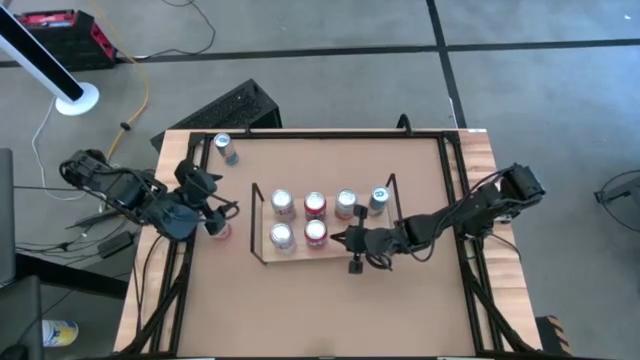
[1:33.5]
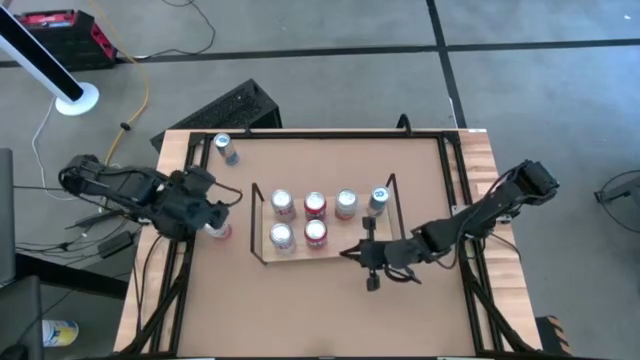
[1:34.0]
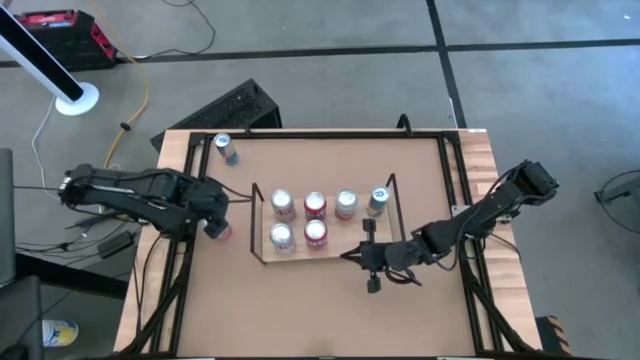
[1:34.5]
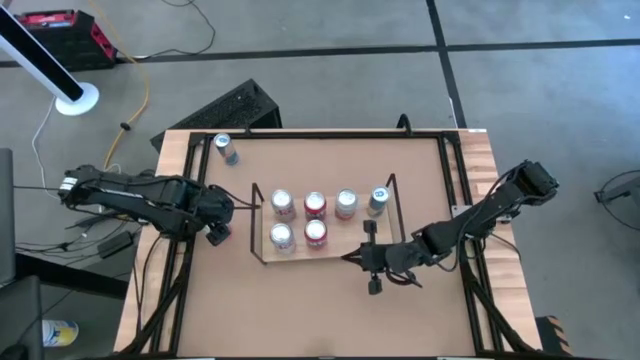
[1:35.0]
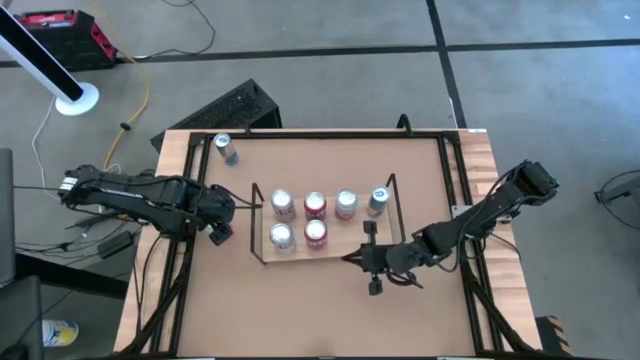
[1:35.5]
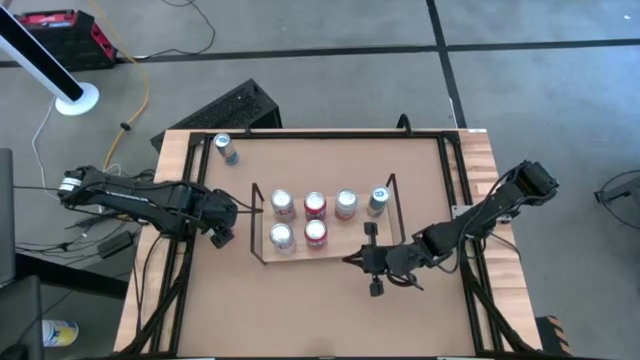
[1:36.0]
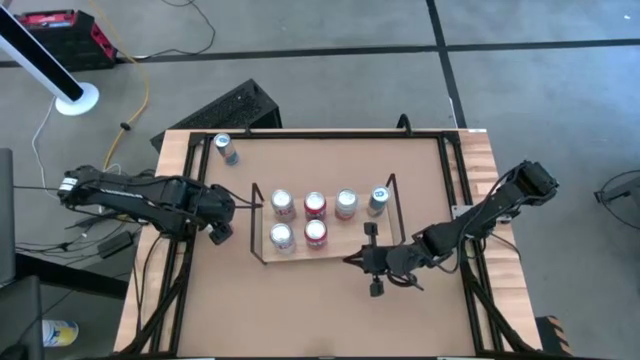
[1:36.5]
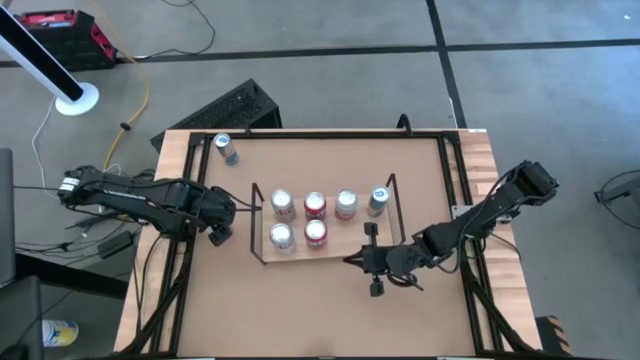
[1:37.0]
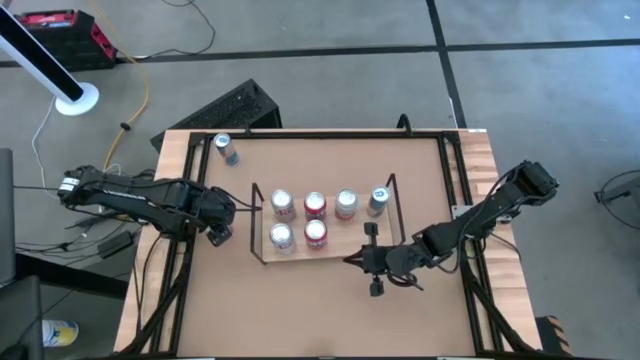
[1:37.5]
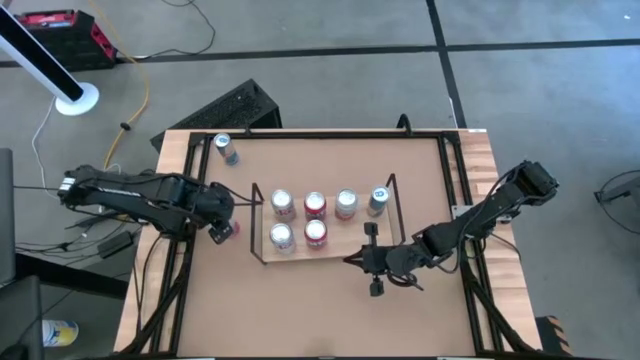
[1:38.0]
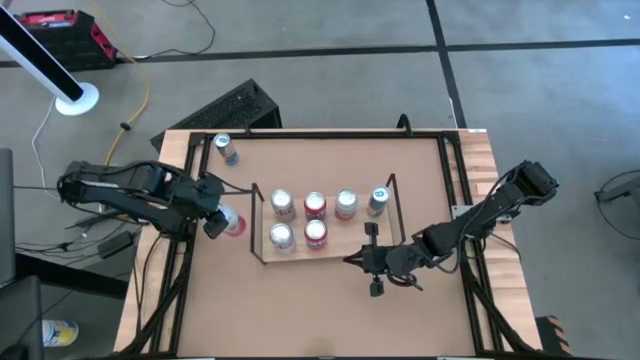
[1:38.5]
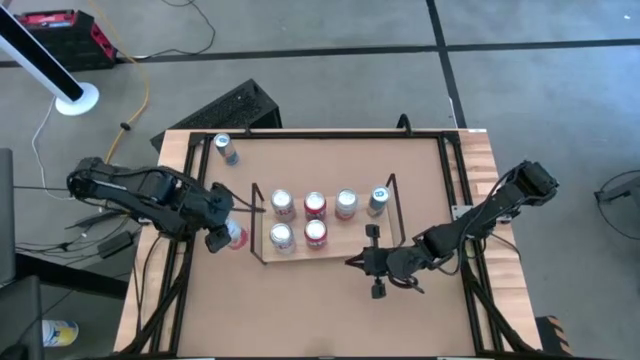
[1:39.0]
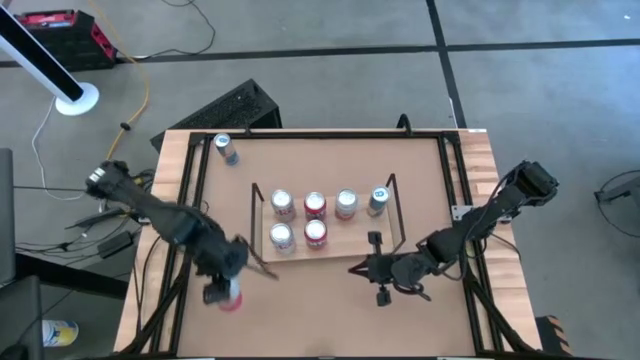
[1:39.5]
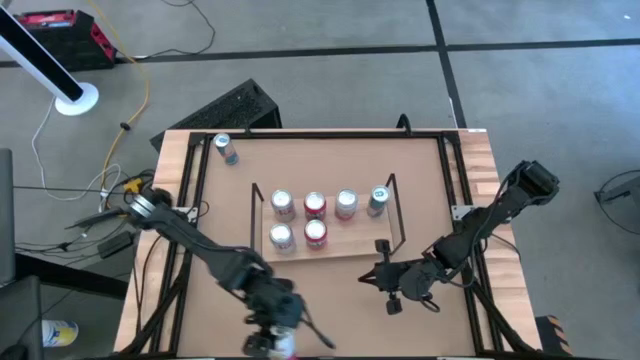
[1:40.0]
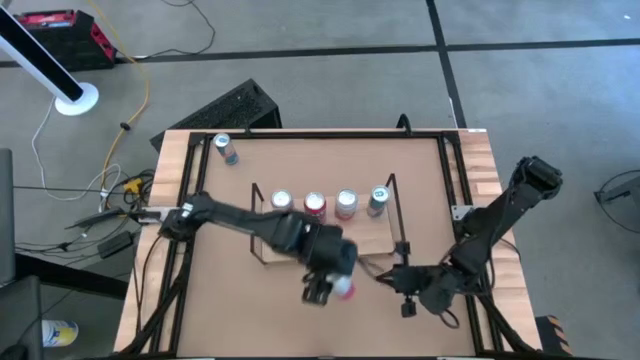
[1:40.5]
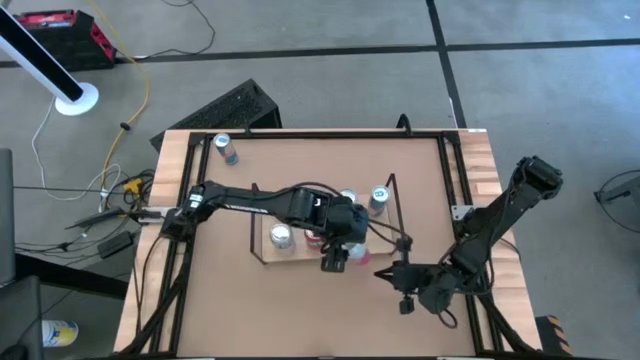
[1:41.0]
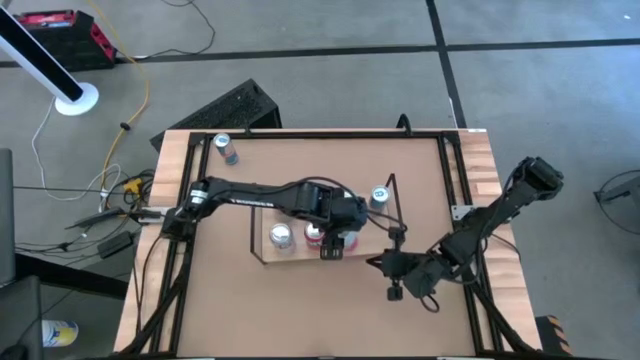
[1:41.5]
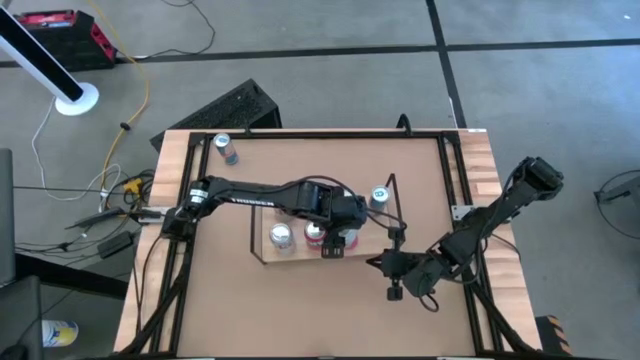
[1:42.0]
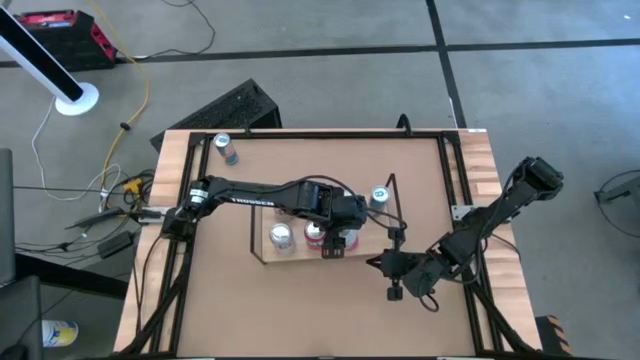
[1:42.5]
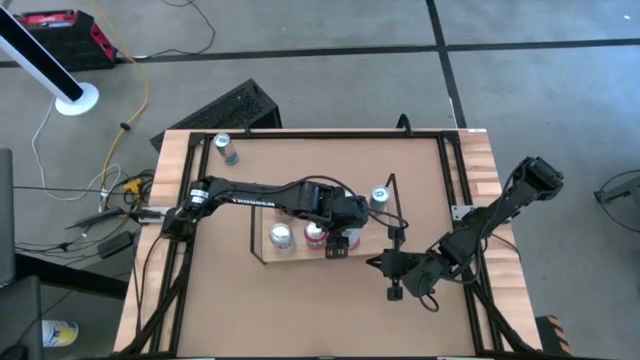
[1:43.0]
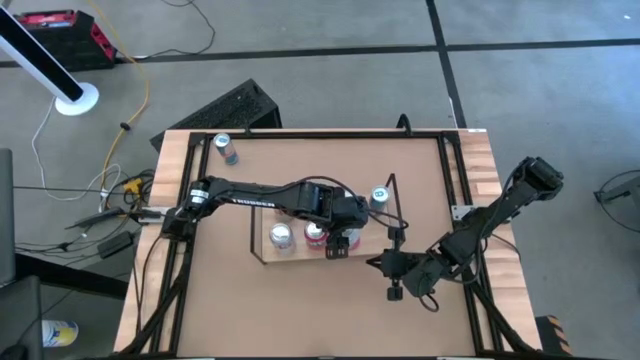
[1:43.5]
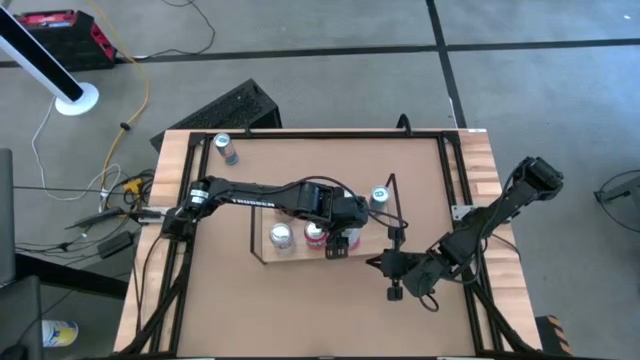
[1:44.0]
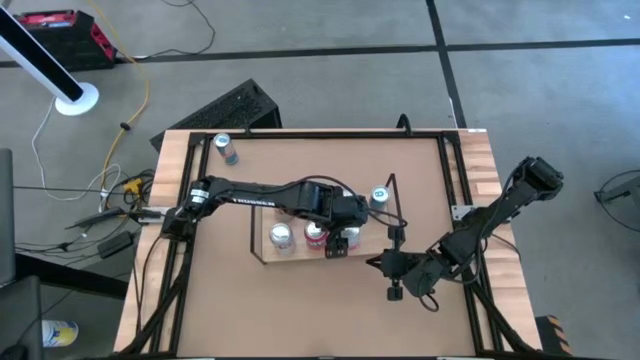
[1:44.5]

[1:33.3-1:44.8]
Task: Place canned beverage on shelf
Put the pink soda can on the shelf aligned with the other orange can

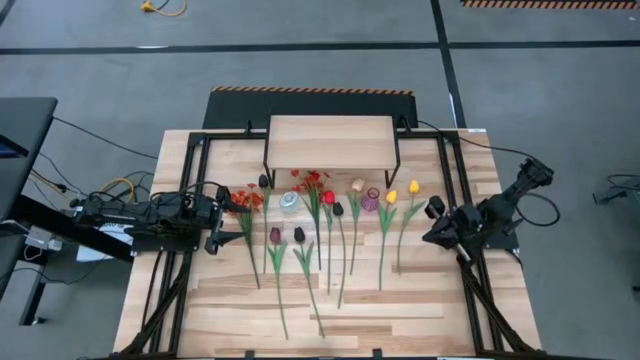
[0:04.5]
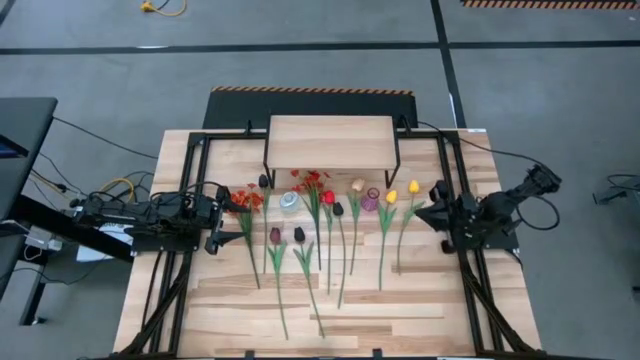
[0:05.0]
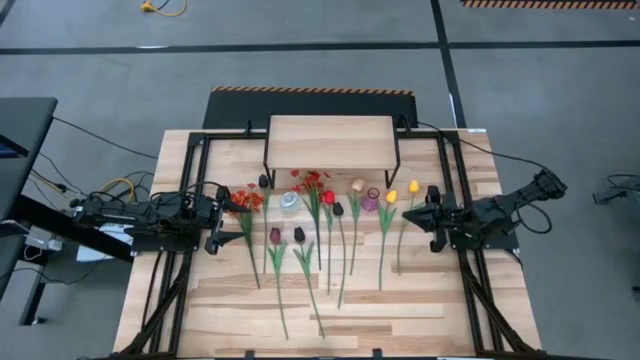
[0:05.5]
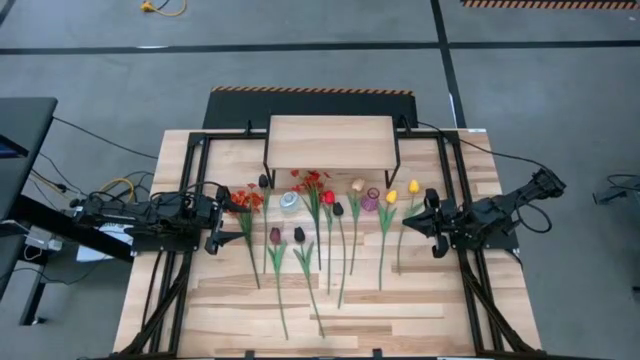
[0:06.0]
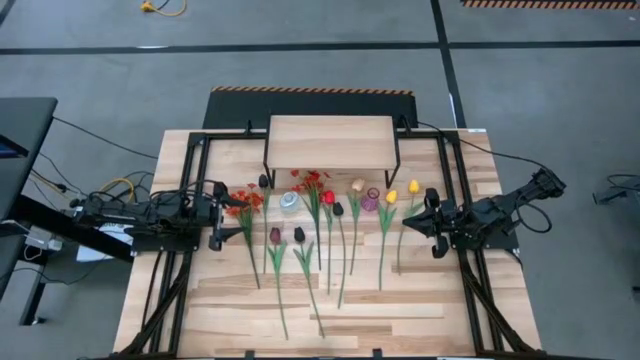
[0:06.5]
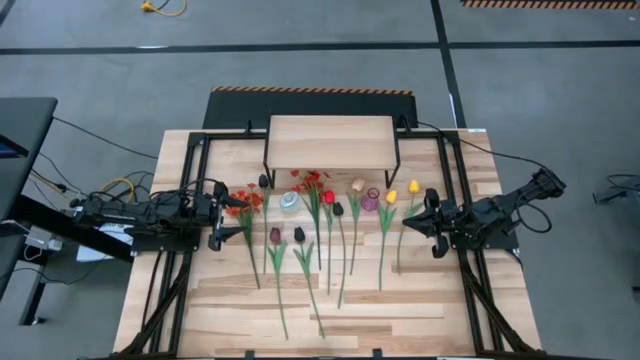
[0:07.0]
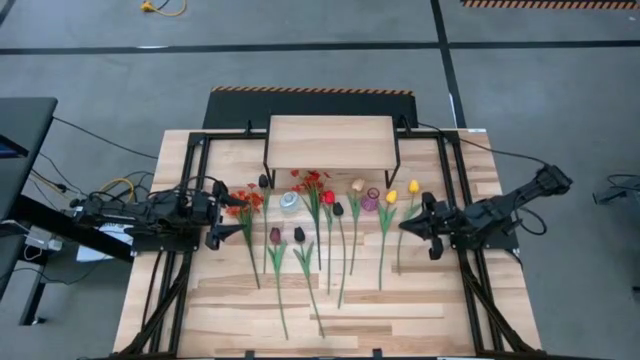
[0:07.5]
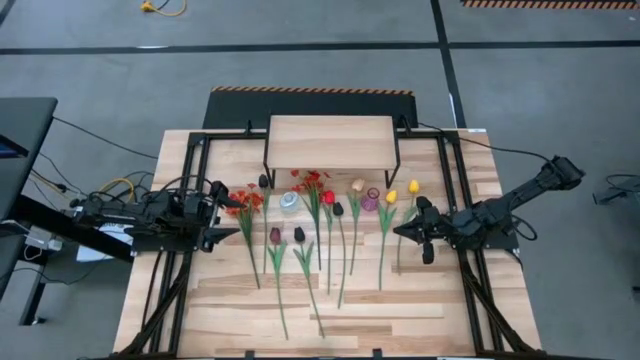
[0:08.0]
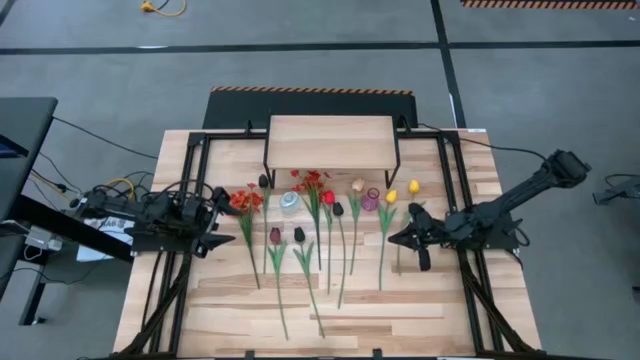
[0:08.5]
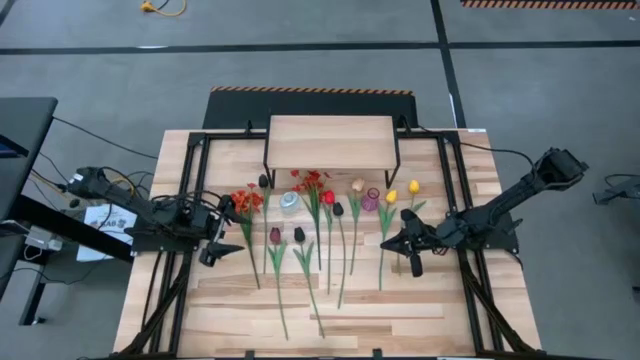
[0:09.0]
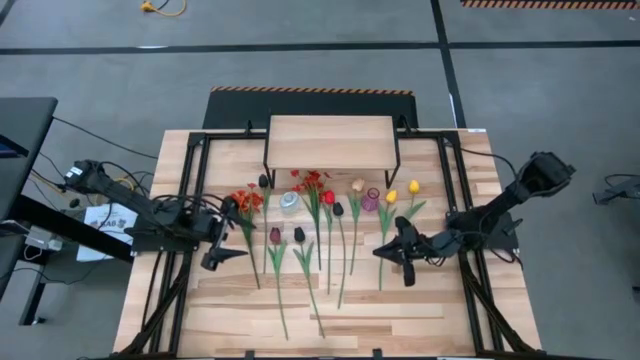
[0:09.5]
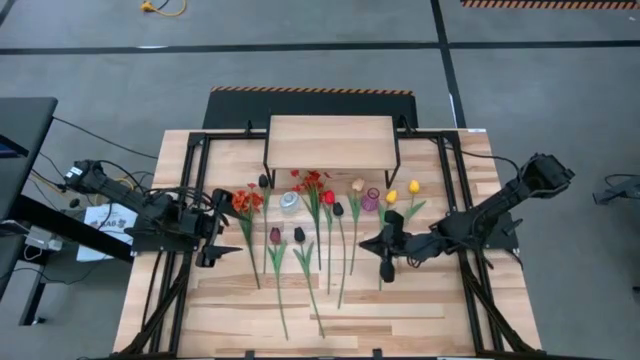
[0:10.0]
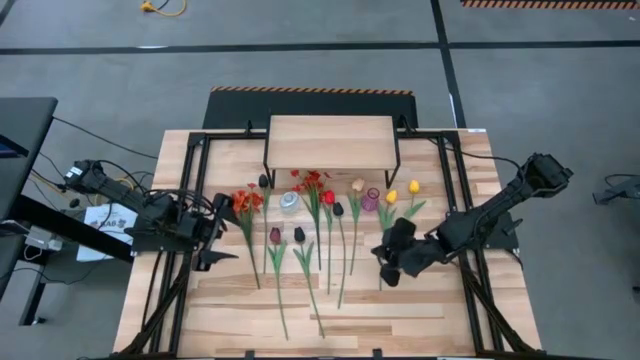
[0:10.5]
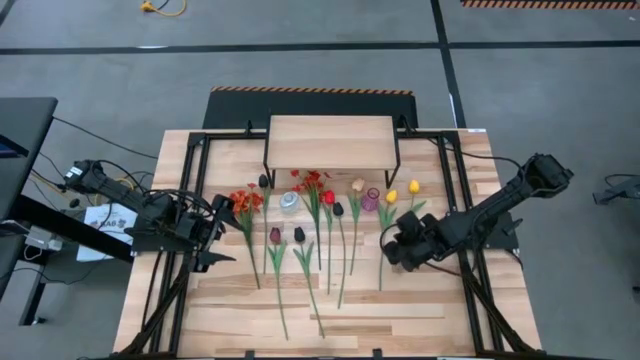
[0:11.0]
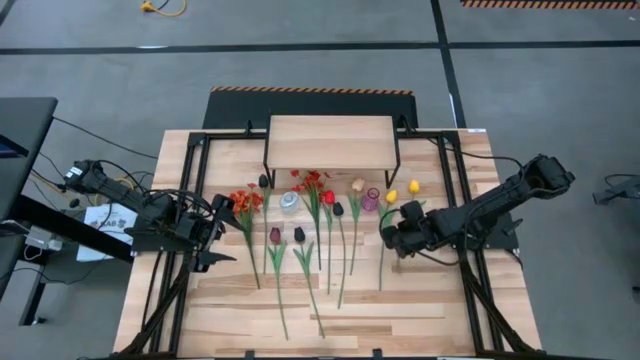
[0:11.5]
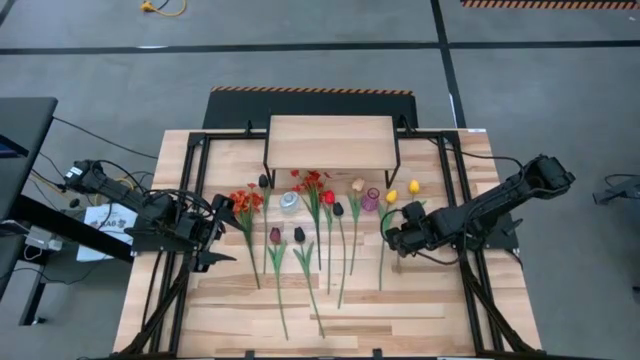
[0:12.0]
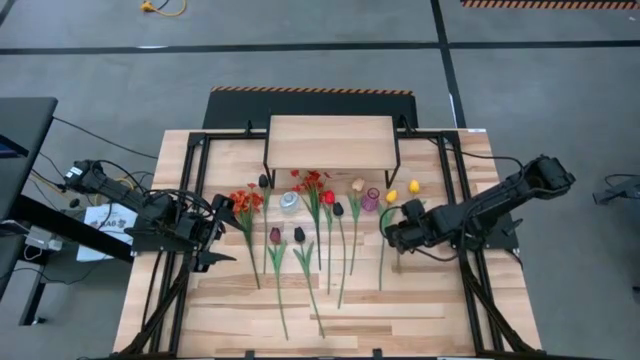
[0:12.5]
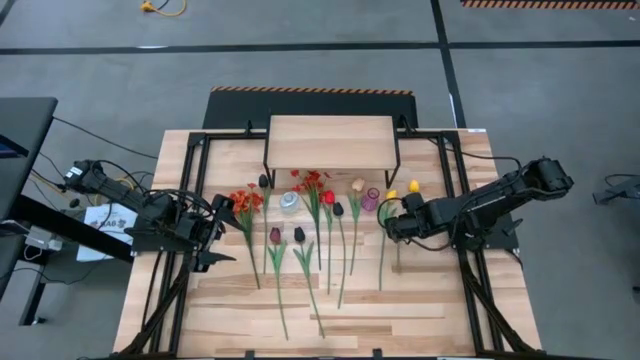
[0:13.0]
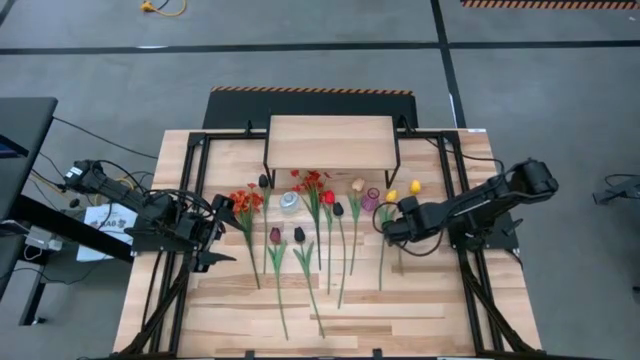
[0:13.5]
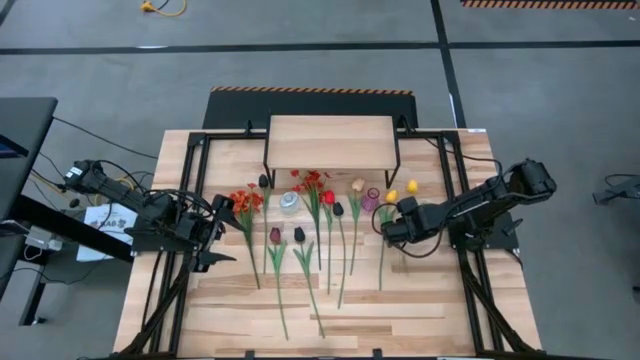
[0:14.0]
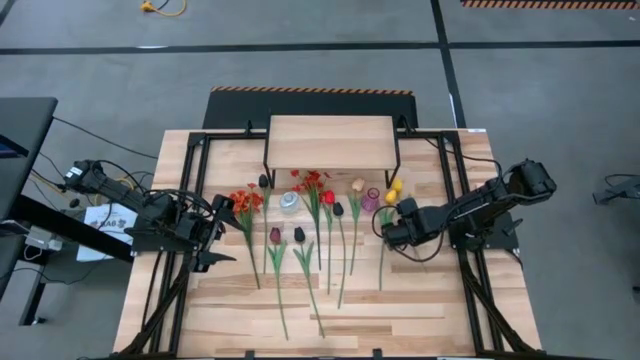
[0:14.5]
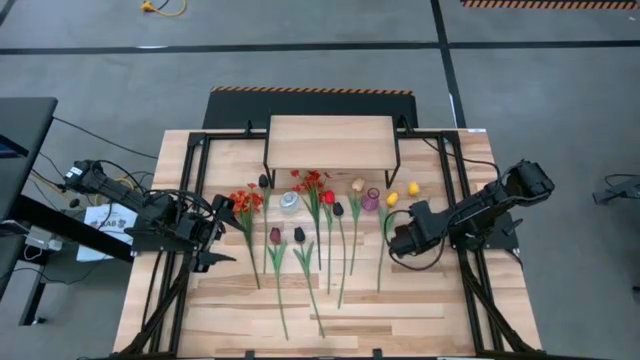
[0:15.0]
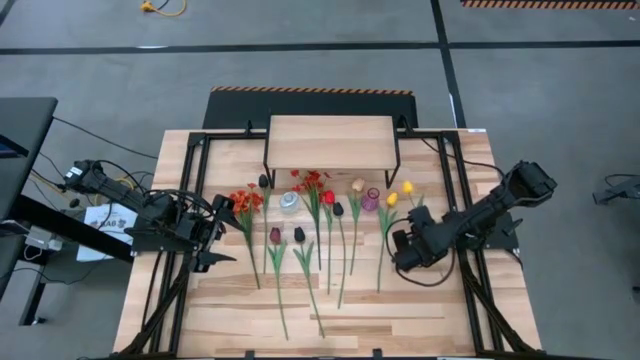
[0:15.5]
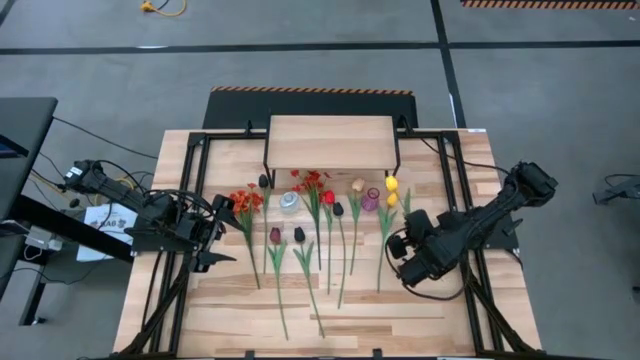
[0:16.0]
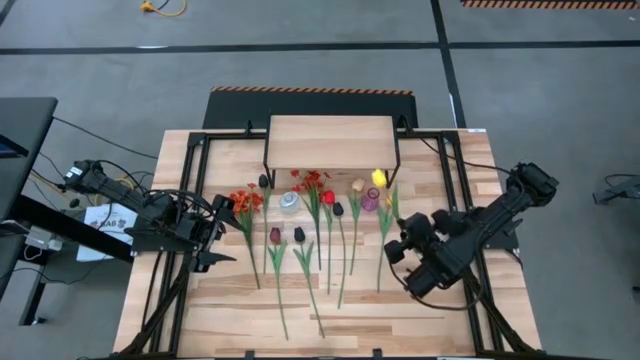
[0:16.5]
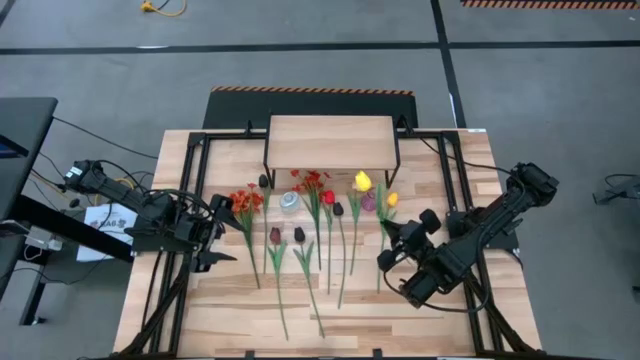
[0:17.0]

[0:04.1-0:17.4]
Task: Pick and place flowers into a vace then onto a shelf
Put the right yellow flower into the transparent vase
